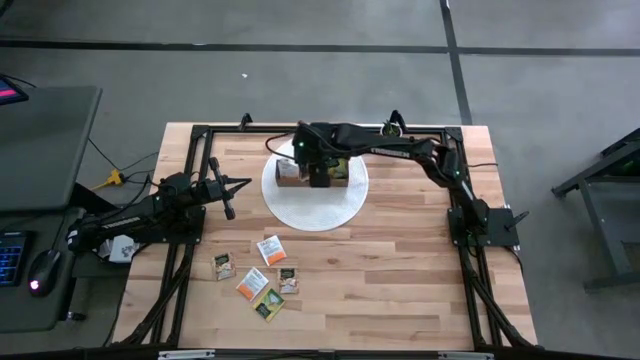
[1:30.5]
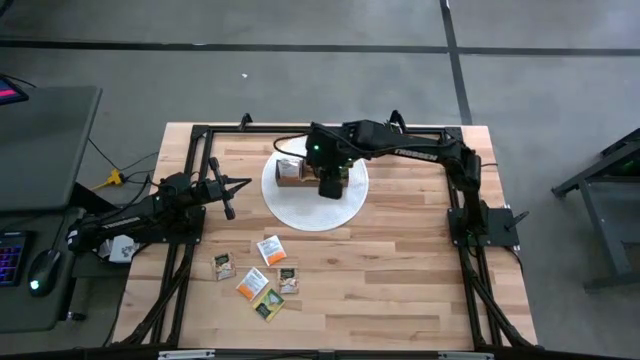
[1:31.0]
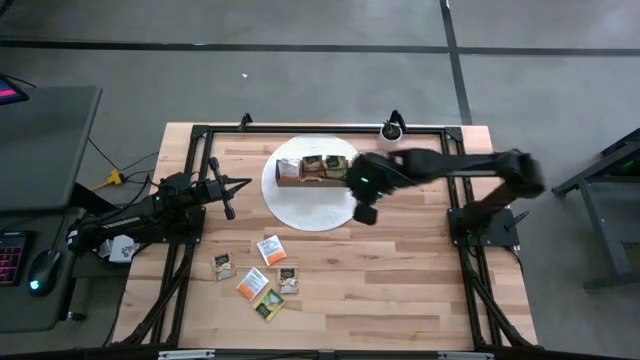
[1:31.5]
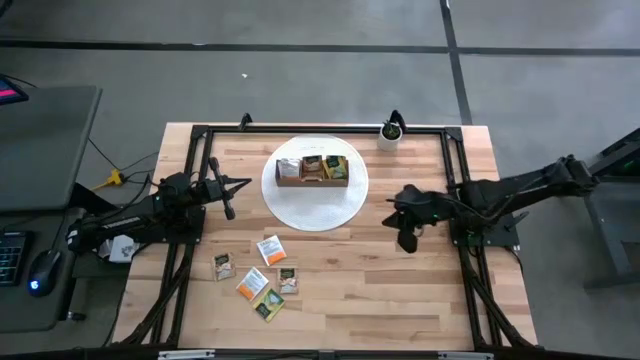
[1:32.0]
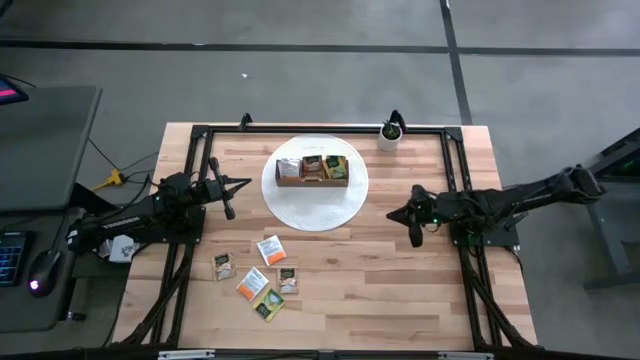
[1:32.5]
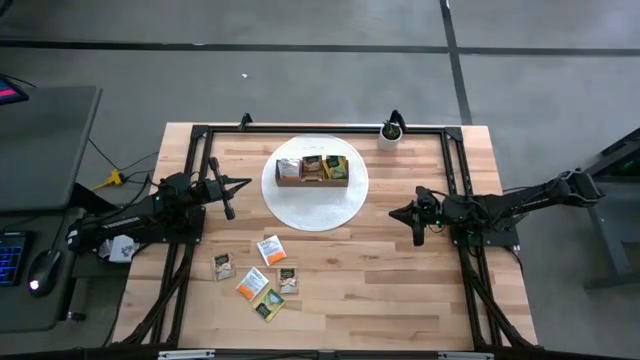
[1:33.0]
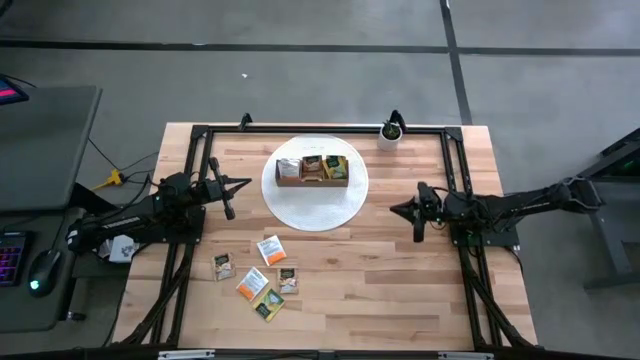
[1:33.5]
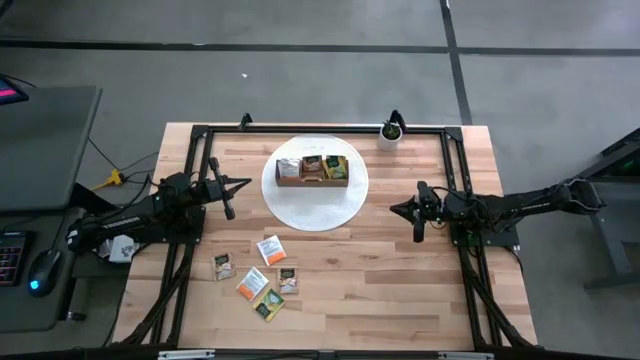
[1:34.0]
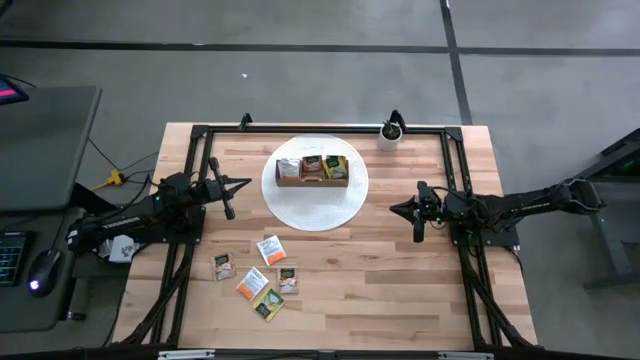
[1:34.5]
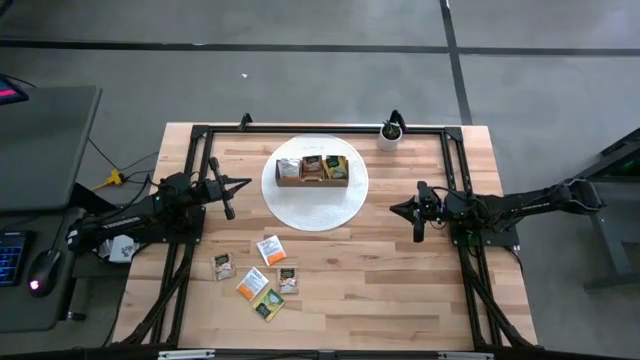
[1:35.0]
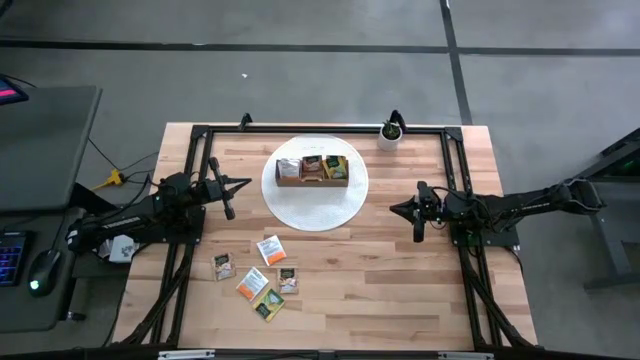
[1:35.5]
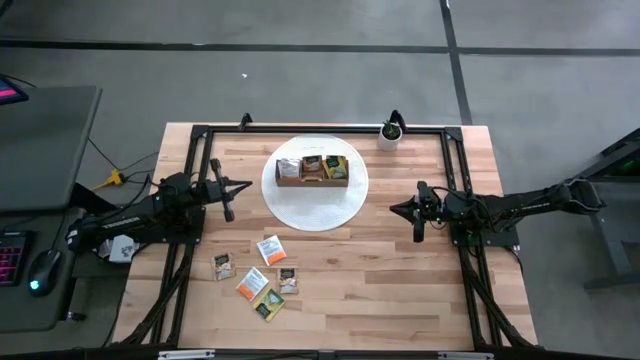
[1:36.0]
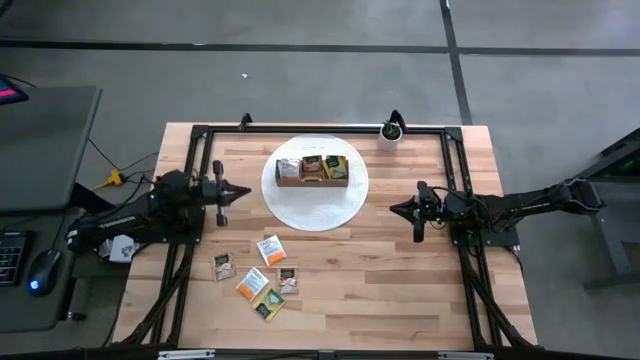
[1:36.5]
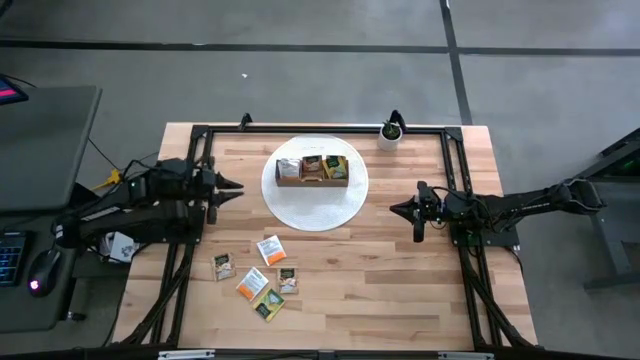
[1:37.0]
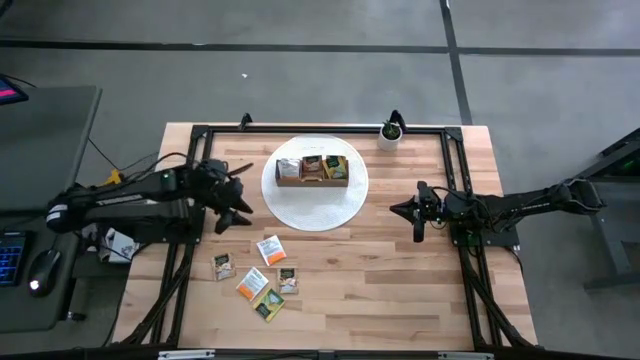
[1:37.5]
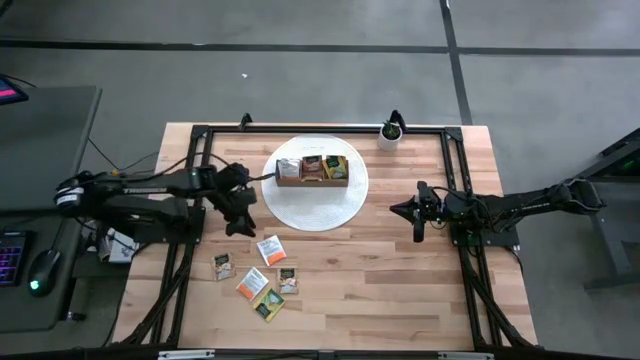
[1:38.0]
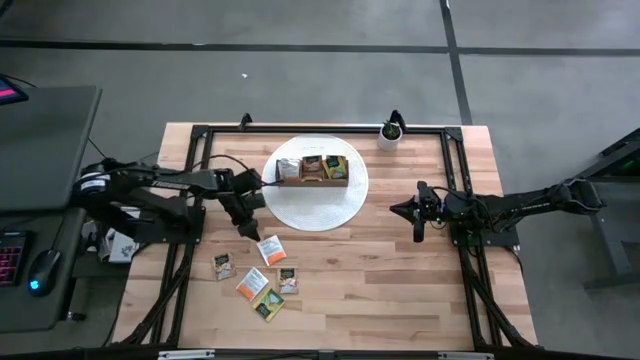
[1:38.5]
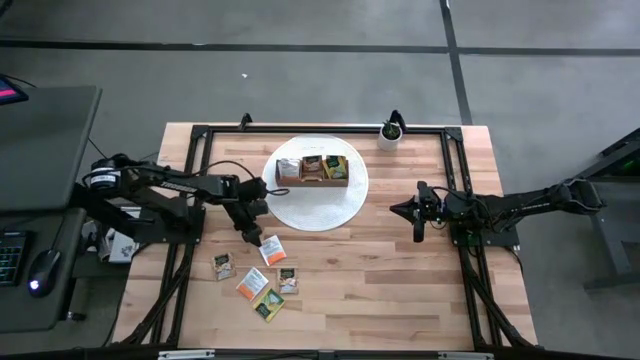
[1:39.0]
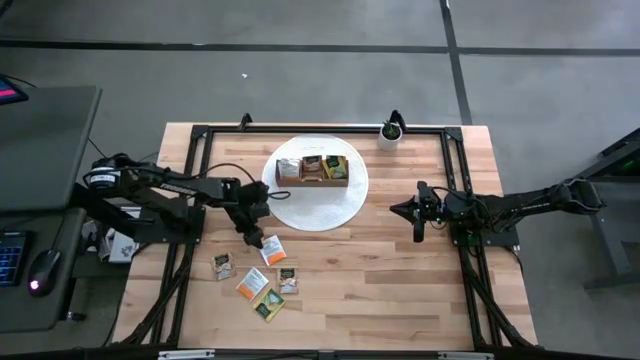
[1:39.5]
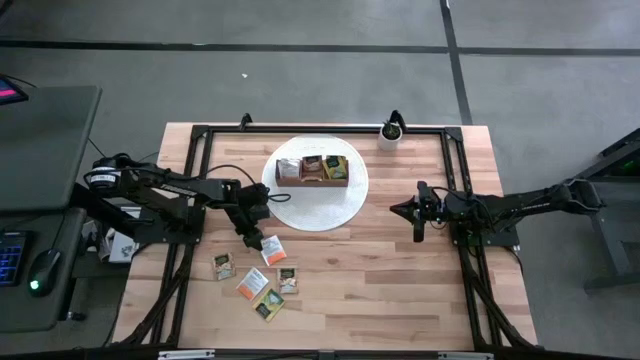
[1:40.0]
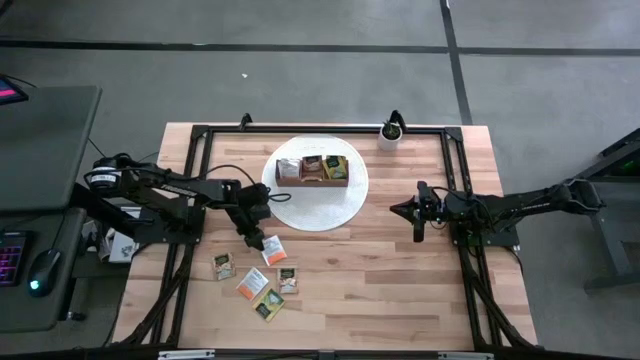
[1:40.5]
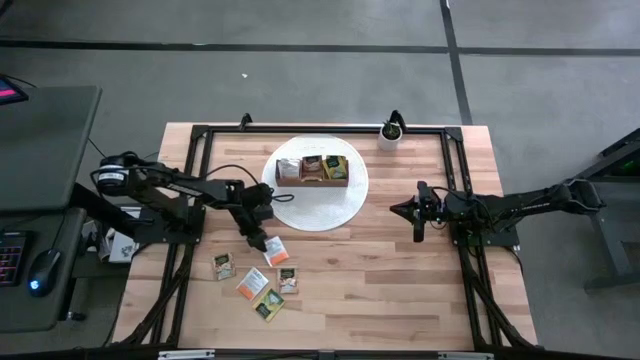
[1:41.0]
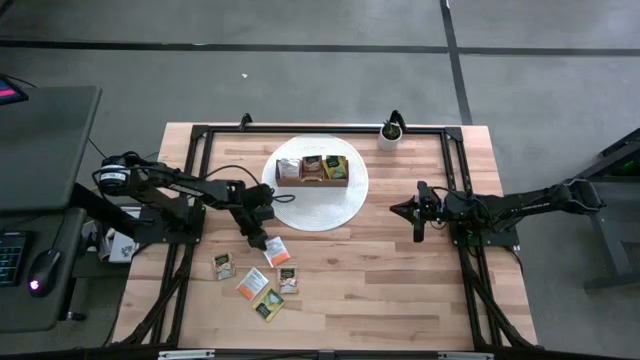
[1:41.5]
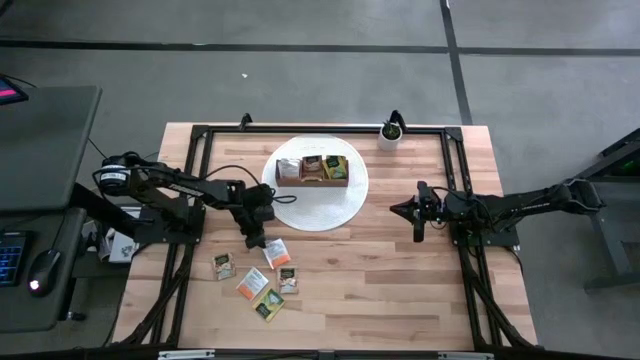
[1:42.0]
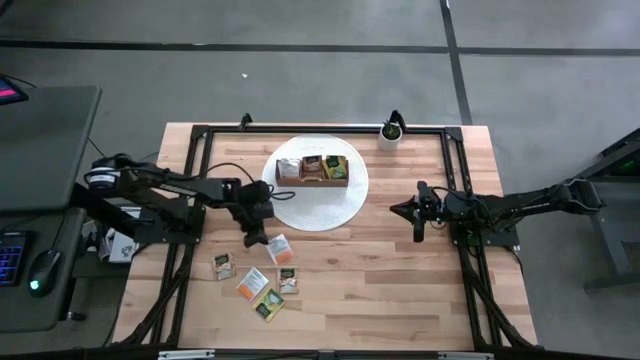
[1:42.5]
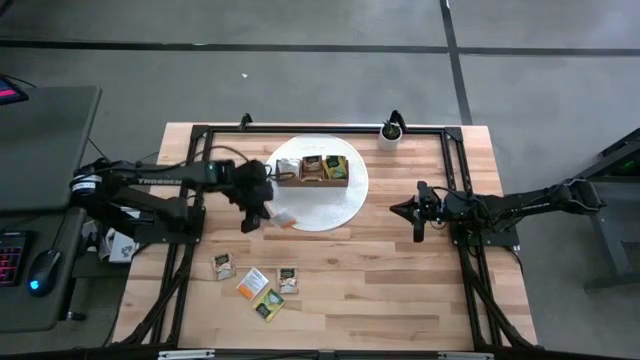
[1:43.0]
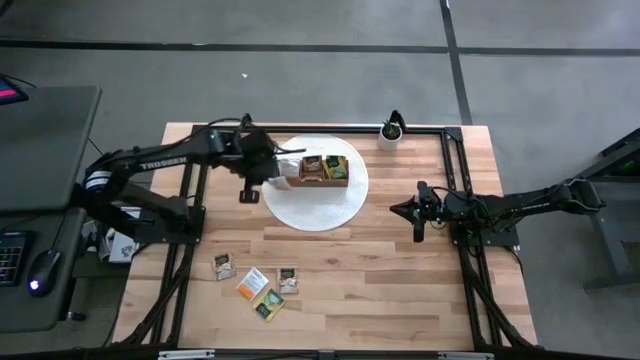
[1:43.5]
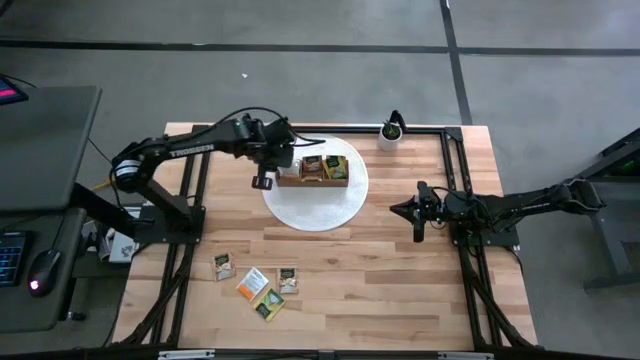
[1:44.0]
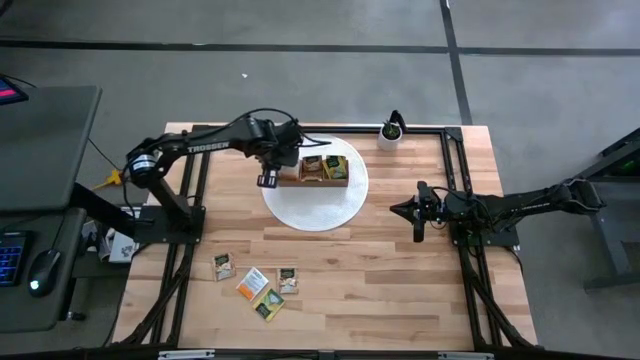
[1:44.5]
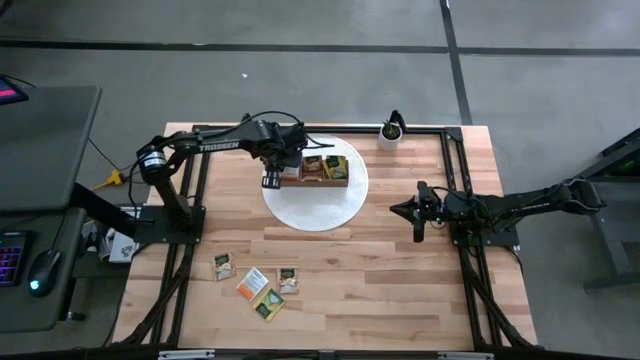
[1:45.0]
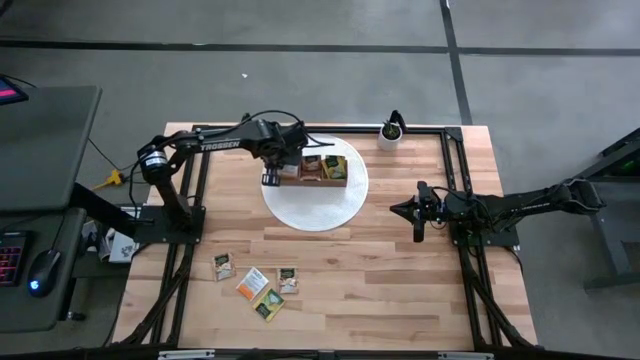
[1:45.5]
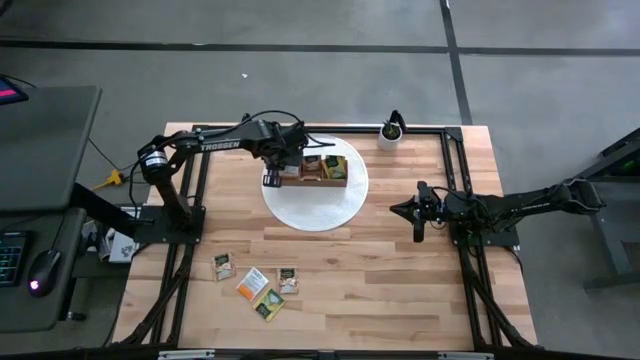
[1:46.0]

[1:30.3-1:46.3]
Task: Pick & Place Tea
Put the white tea bag into the left section of the wooden organizer

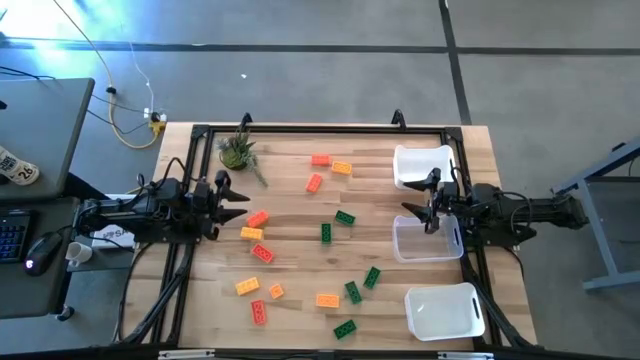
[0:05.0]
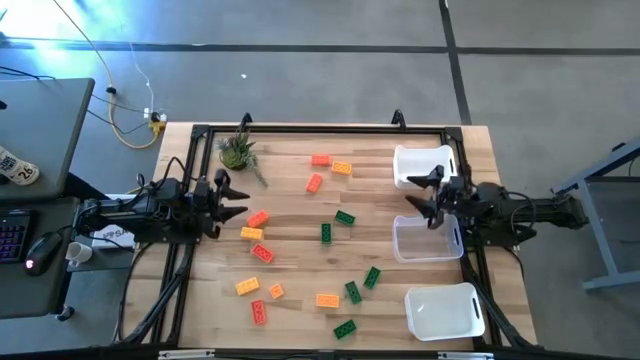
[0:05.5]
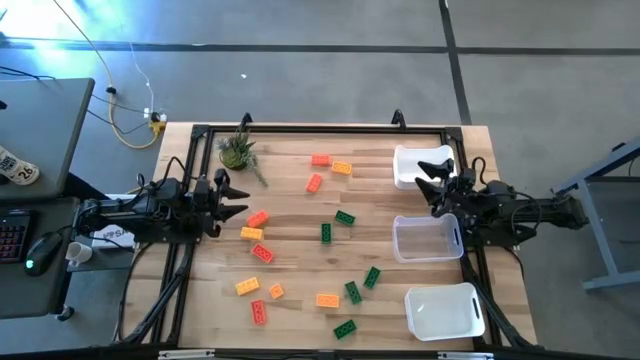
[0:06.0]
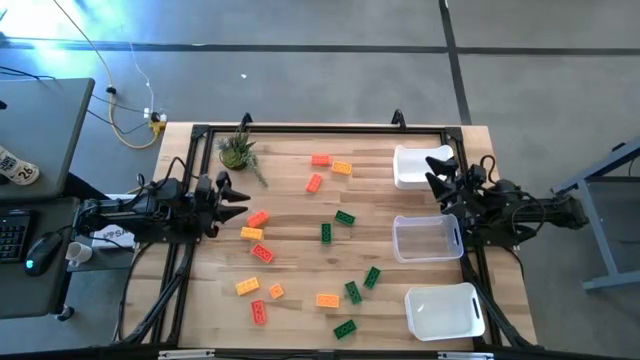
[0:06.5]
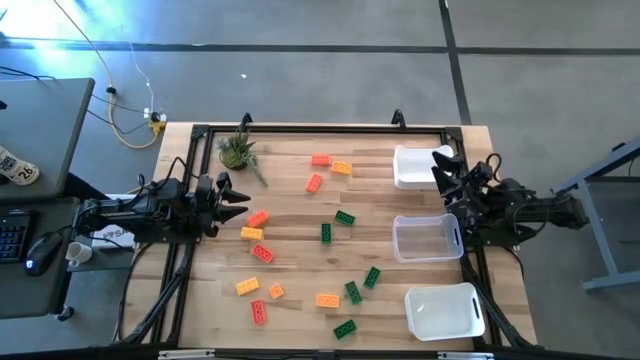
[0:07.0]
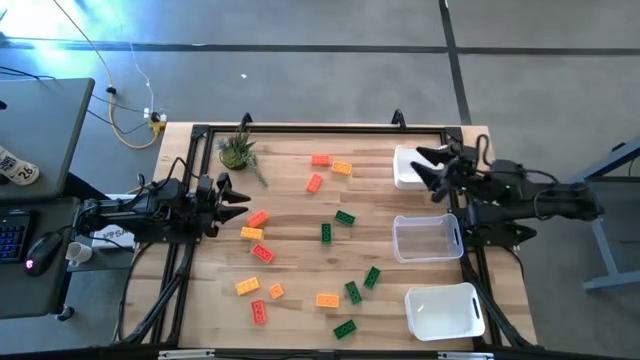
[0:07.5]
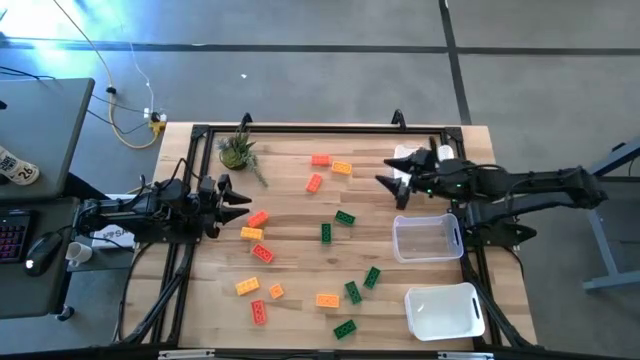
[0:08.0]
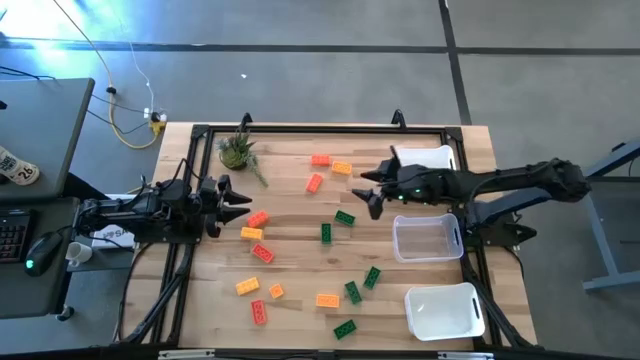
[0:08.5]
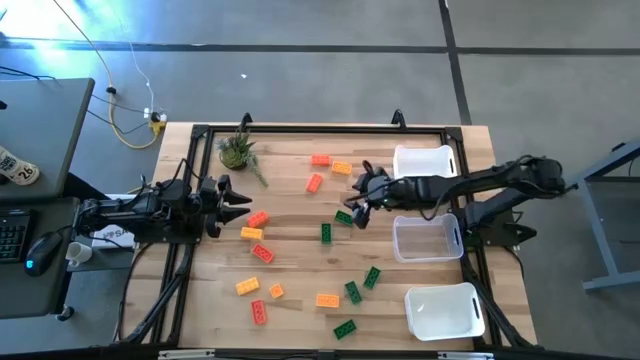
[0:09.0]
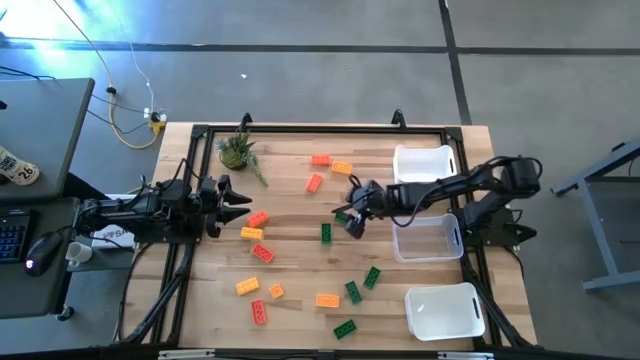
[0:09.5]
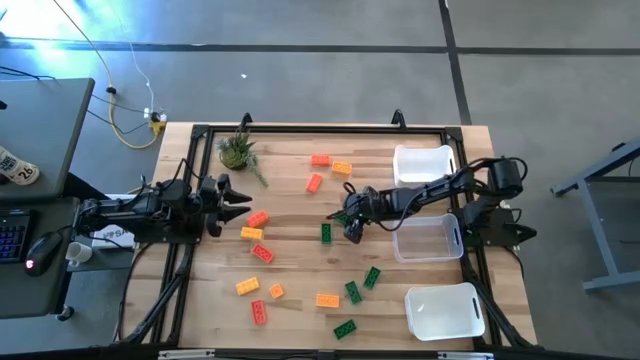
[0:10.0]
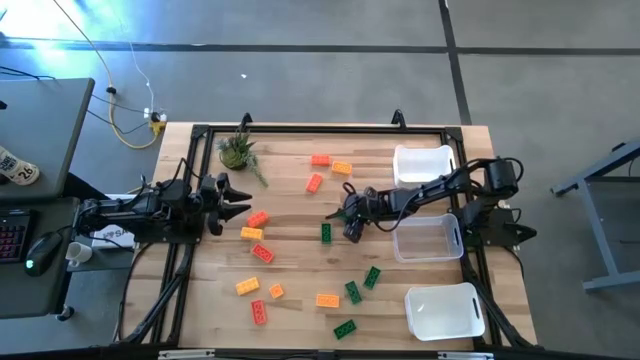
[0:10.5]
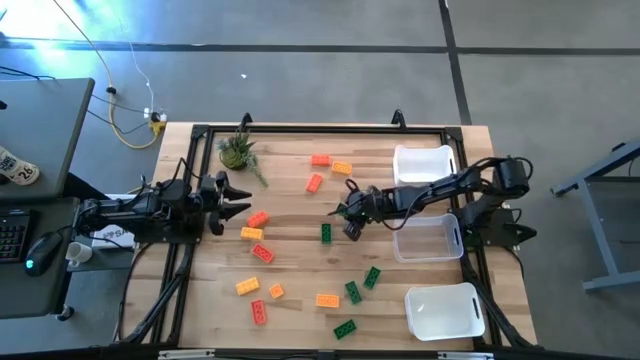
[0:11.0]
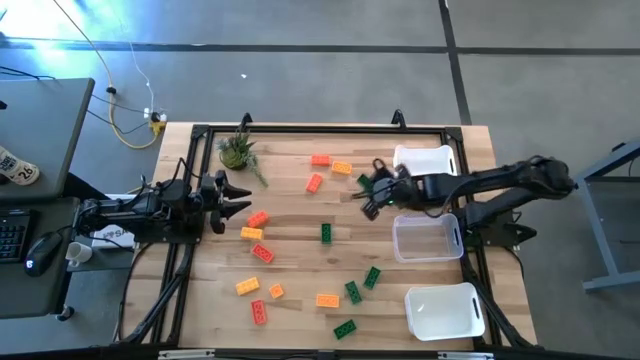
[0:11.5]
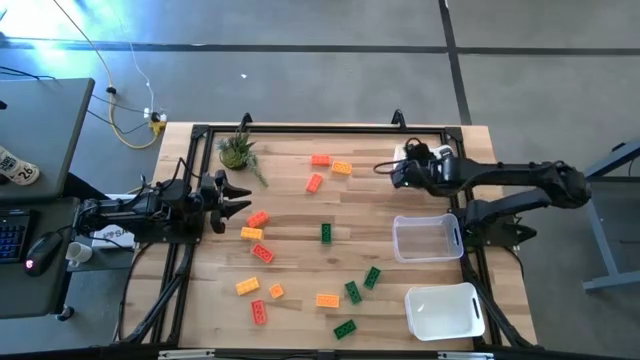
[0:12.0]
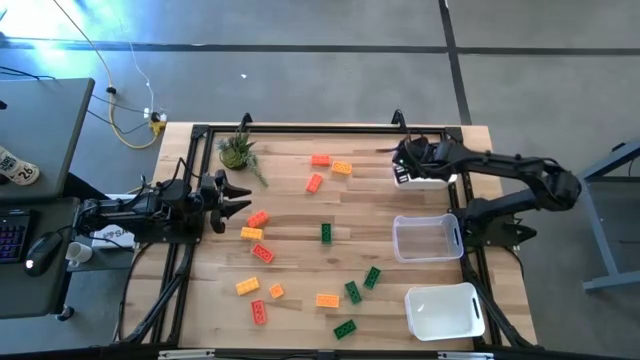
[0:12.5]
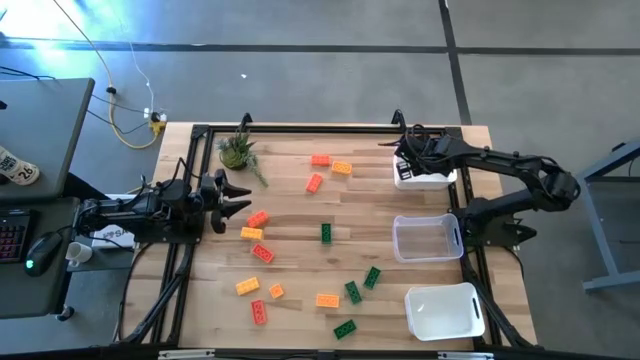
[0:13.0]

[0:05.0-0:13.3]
Task: Sort & place blocks by color
Put the green game piece into the top white bin
